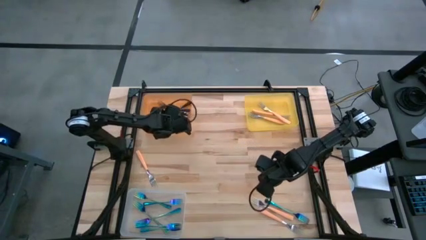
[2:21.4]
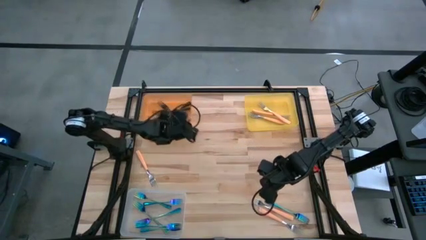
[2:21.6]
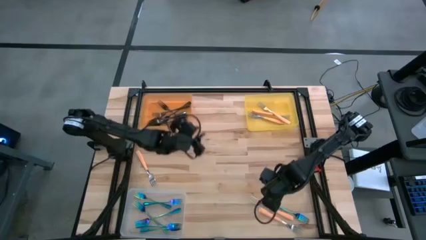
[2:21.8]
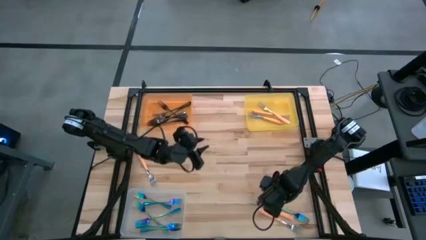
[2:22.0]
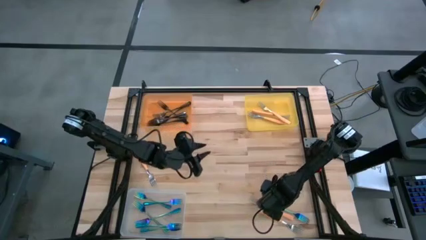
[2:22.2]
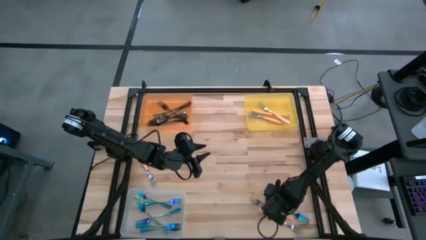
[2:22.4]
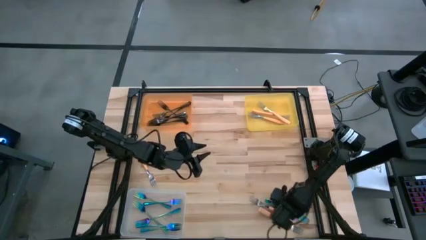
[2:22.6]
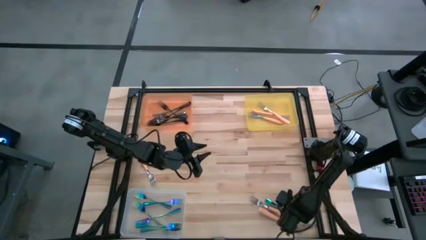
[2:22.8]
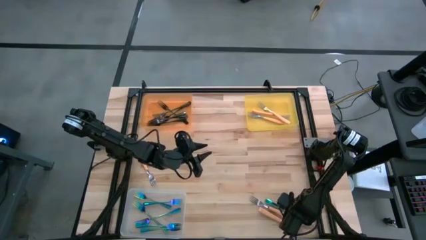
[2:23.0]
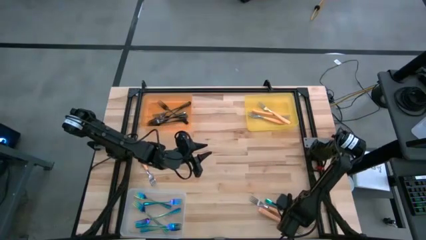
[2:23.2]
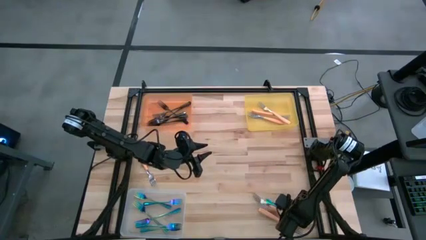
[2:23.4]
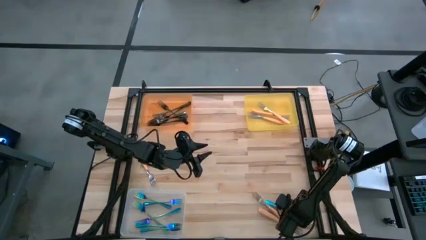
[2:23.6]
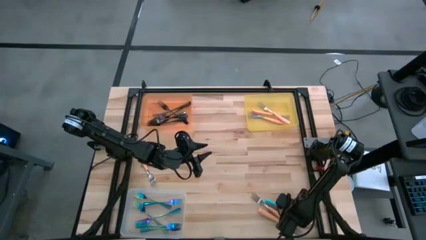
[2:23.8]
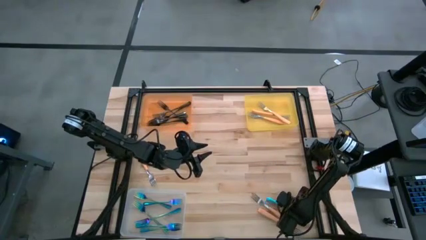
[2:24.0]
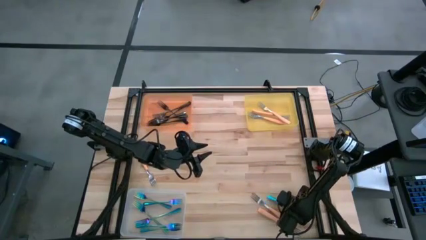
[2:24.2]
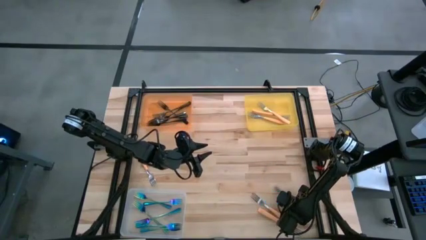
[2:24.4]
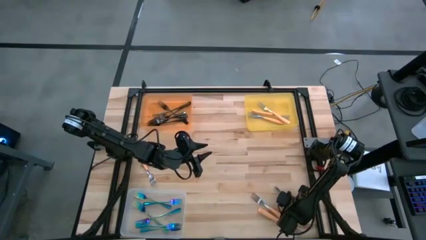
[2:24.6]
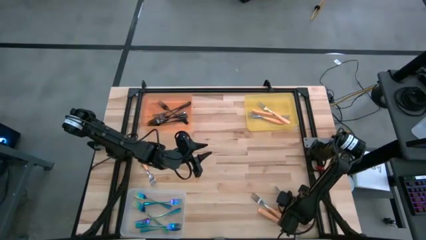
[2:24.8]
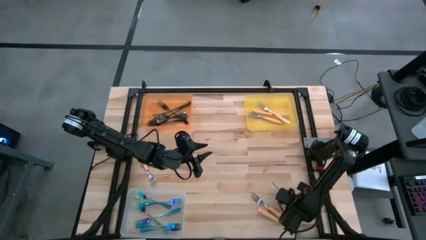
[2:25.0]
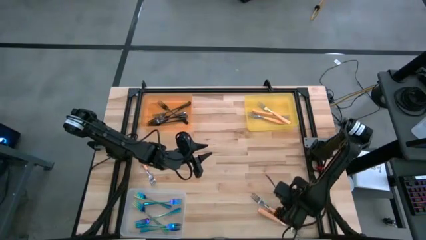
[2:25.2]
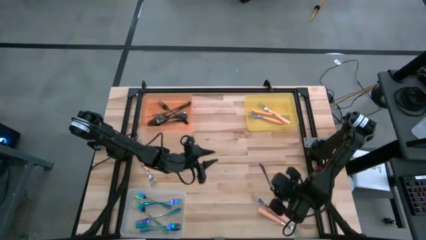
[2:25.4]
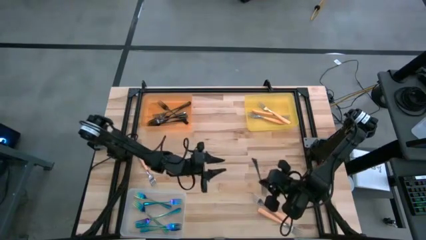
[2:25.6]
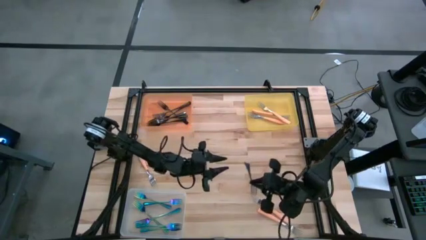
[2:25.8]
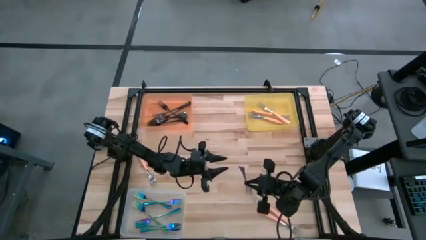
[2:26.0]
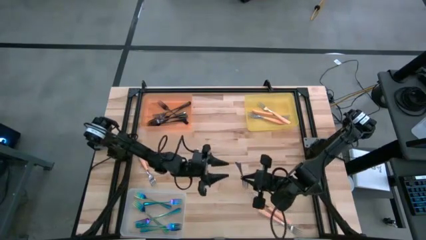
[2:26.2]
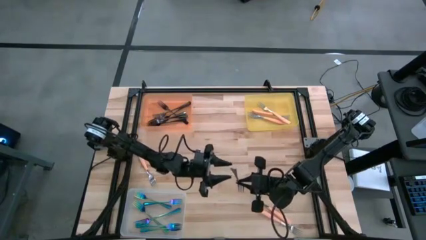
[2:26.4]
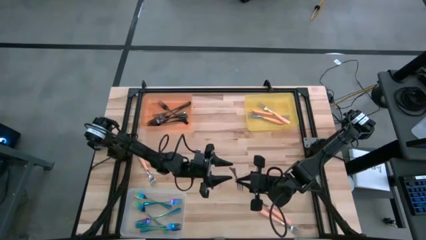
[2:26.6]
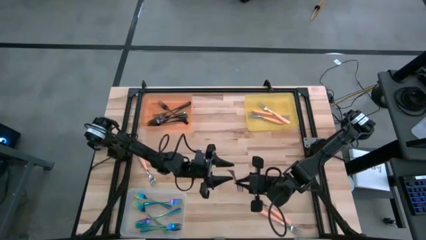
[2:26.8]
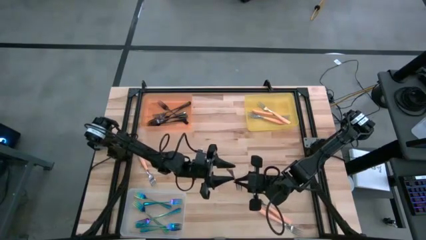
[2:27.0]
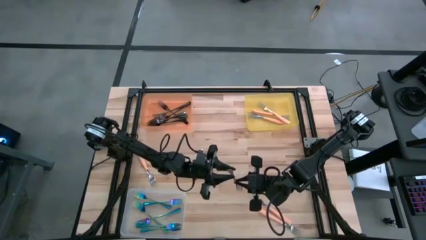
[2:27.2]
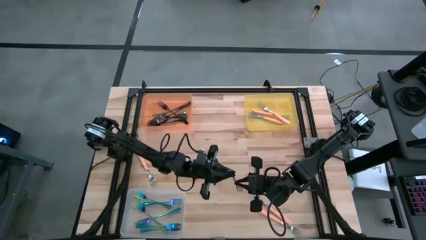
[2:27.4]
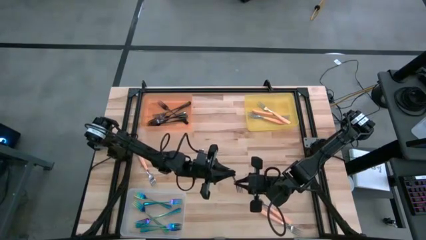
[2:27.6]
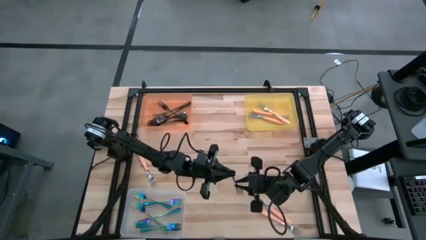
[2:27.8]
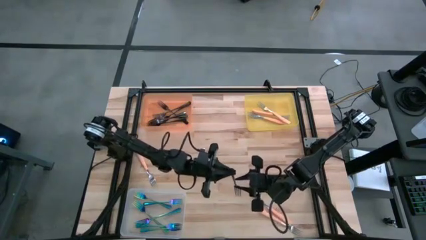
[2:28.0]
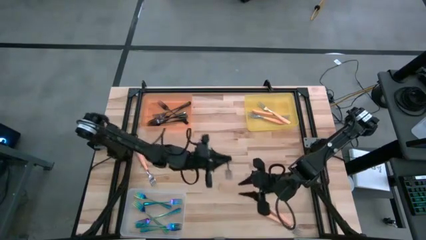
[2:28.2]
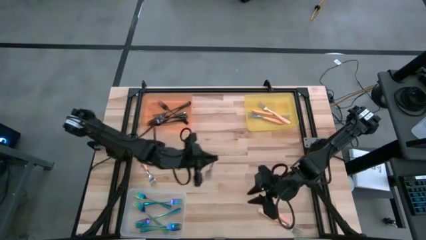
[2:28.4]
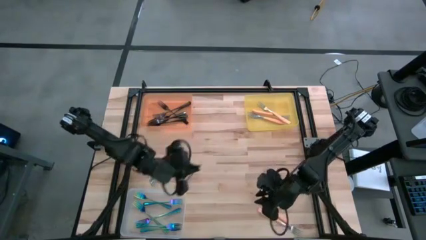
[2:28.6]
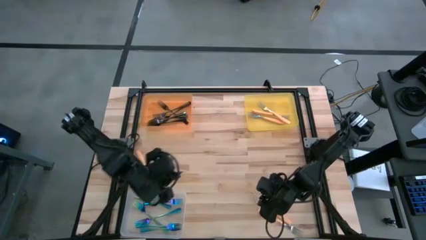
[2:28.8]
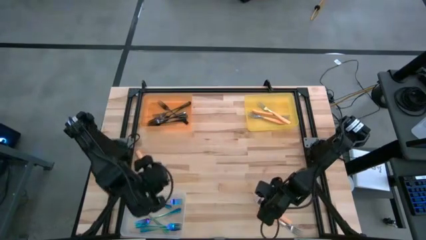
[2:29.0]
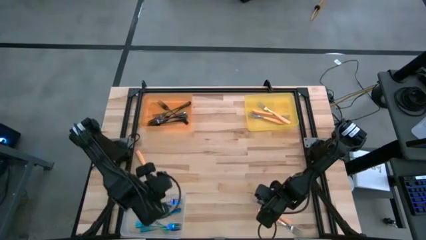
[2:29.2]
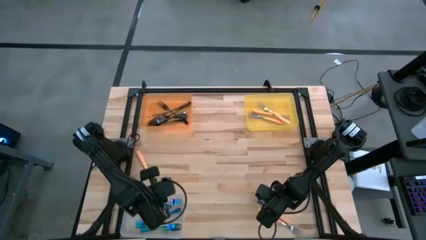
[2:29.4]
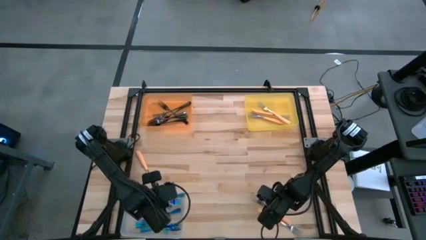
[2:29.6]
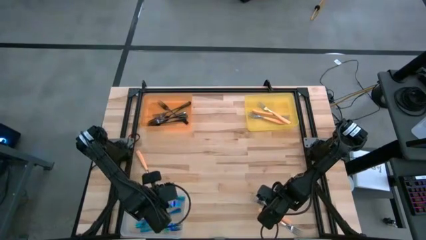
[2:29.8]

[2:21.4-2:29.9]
Task: Sort silverware by color (type)
Put the blue fork into the transparent bin

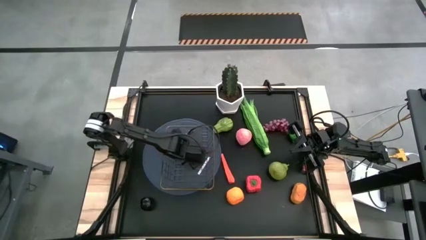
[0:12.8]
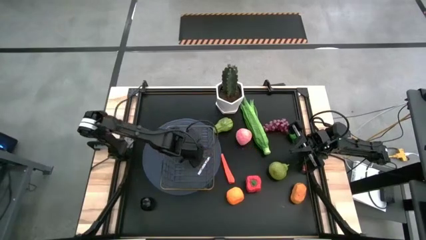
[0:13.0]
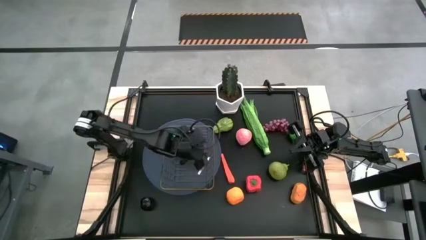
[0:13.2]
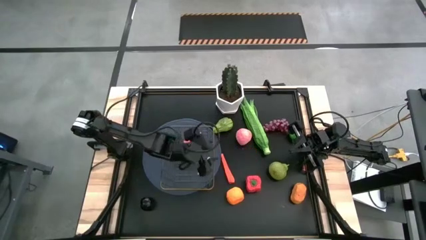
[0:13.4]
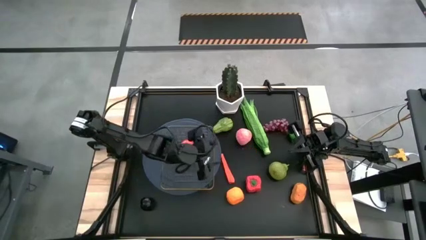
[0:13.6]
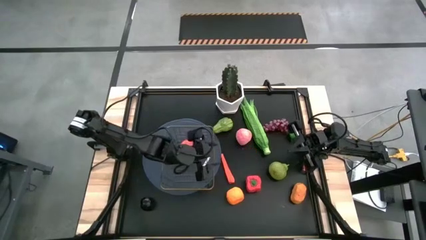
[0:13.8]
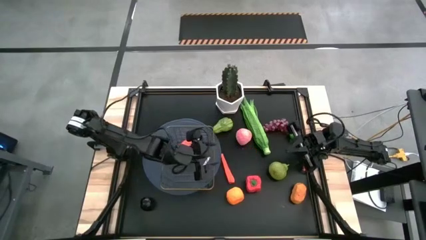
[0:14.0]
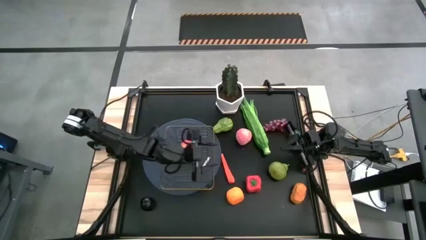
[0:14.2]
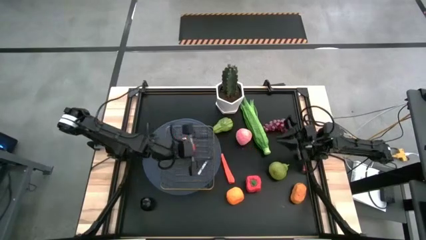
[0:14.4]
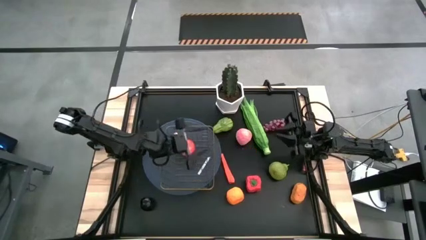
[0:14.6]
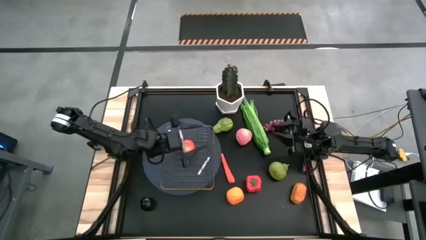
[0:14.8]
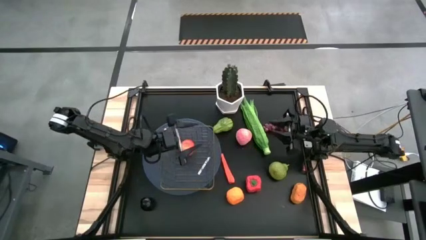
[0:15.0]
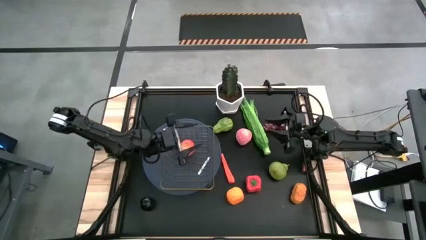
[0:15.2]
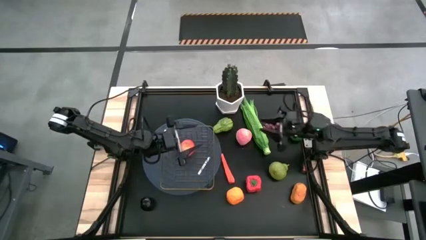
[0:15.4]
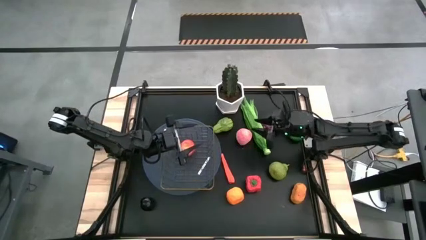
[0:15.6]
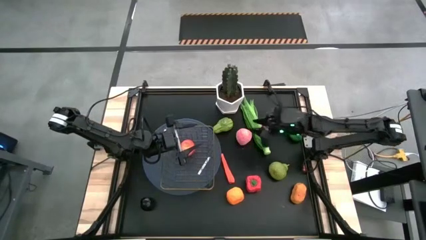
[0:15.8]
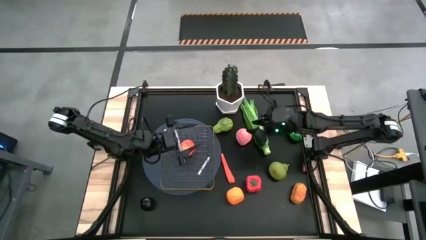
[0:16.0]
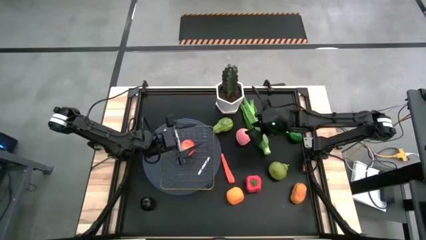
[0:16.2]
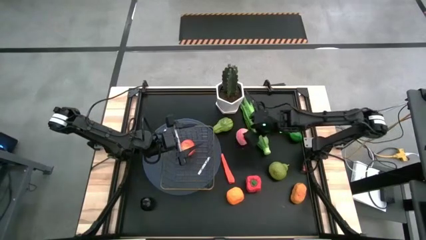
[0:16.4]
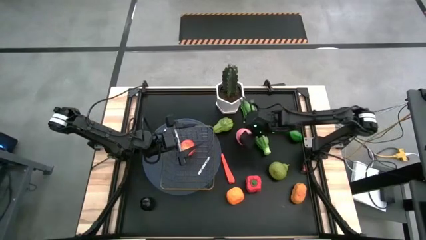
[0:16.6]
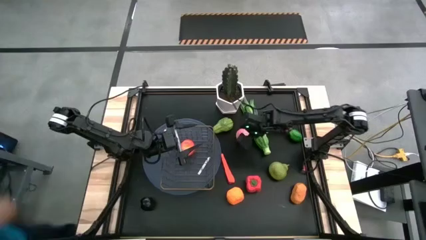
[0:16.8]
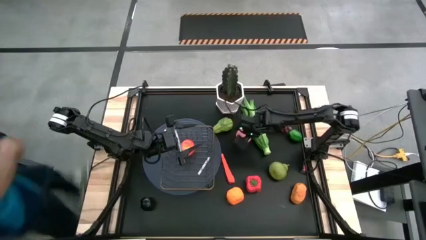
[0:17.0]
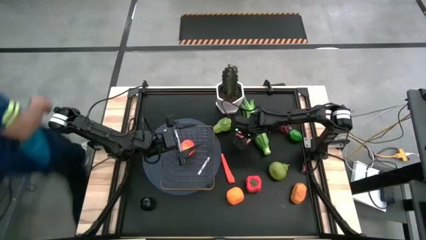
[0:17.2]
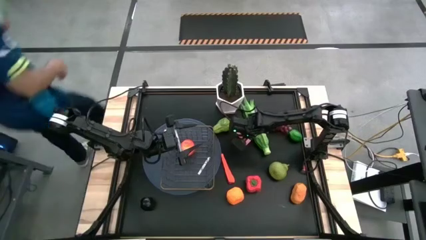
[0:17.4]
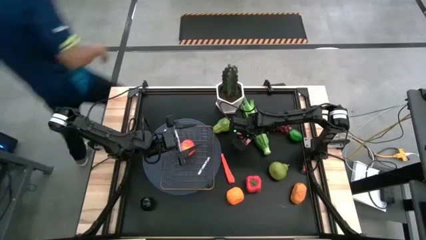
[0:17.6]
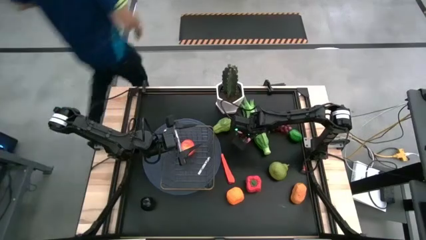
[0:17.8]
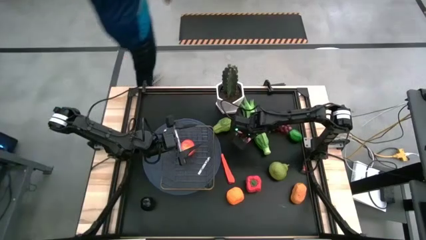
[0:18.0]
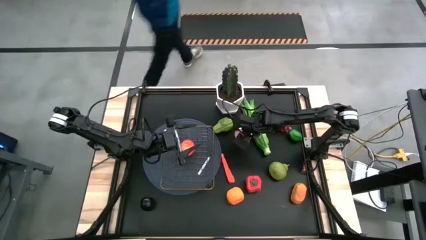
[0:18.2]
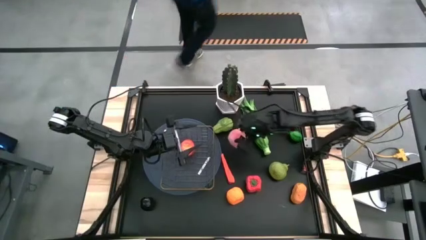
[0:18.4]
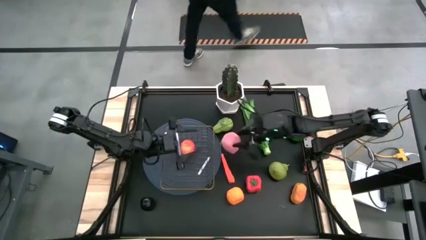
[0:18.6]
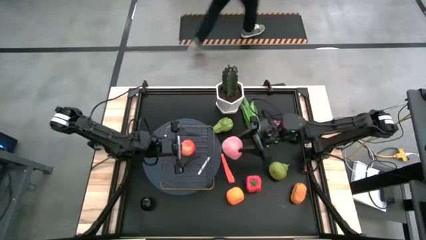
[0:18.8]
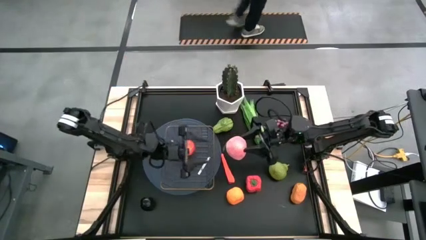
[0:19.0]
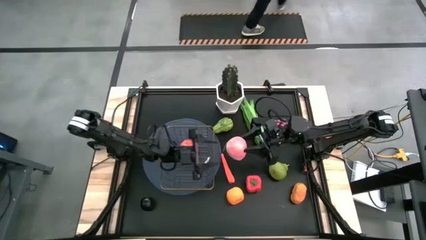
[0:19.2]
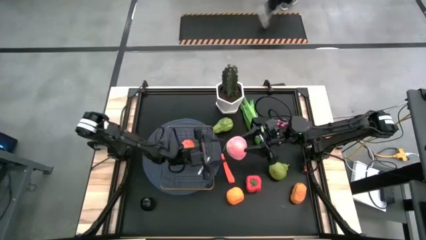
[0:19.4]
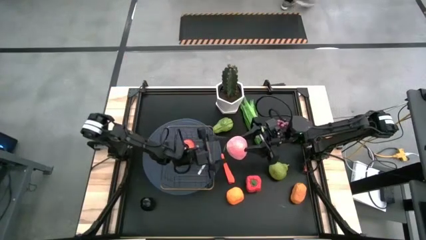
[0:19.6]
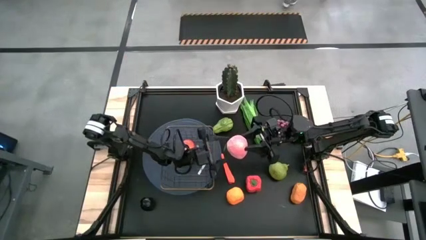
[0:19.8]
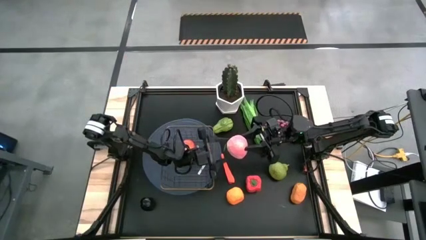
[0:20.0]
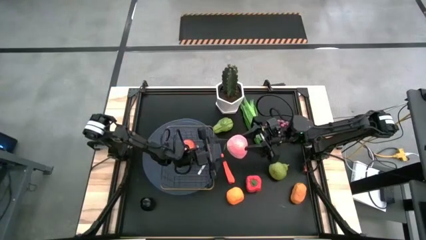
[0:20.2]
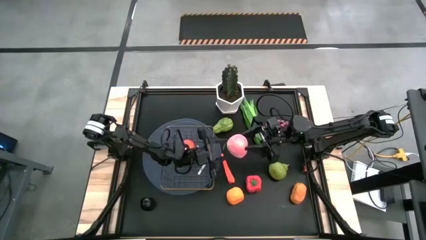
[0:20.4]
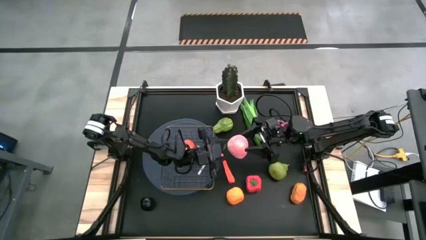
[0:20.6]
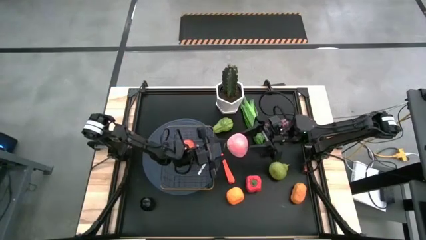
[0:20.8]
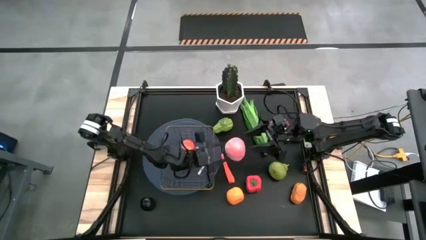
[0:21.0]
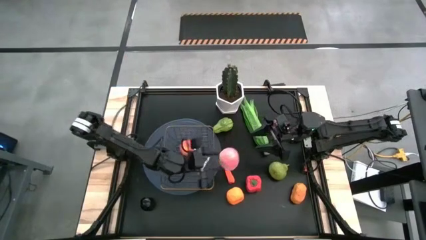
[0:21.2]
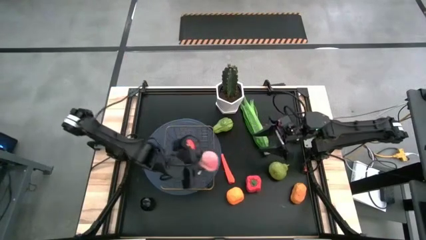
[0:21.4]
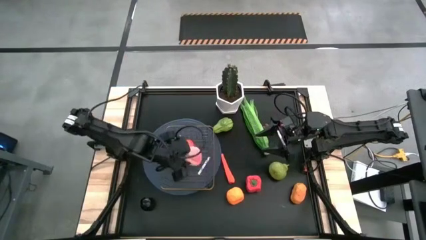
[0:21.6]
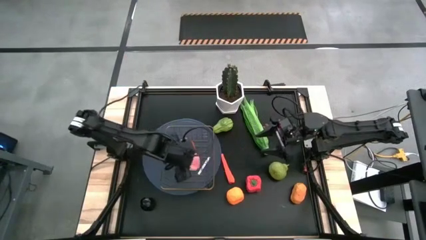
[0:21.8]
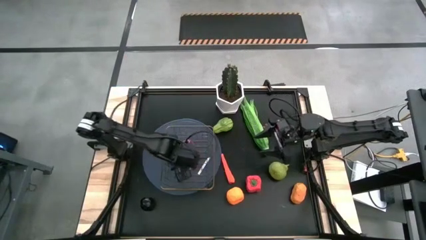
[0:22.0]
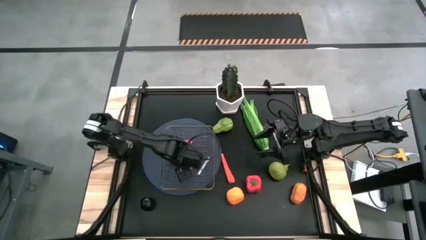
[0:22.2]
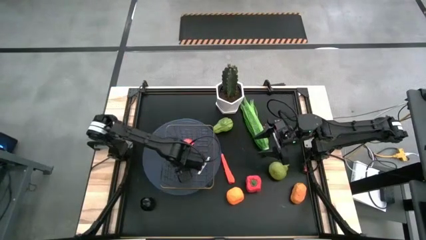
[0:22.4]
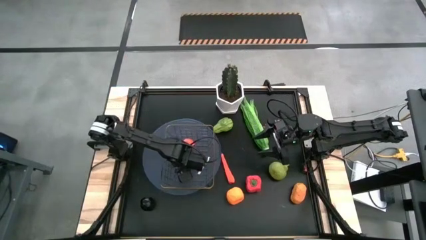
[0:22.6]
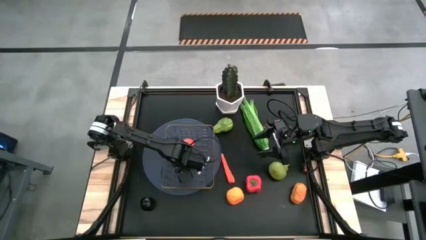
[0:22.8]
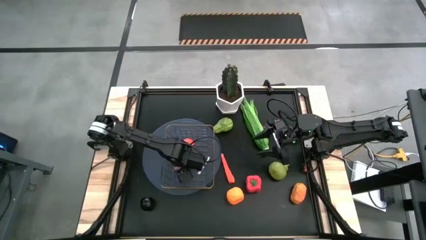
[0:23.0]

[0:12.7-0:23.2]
Task: Build produce basket
Put the pink peach into the wire basket
